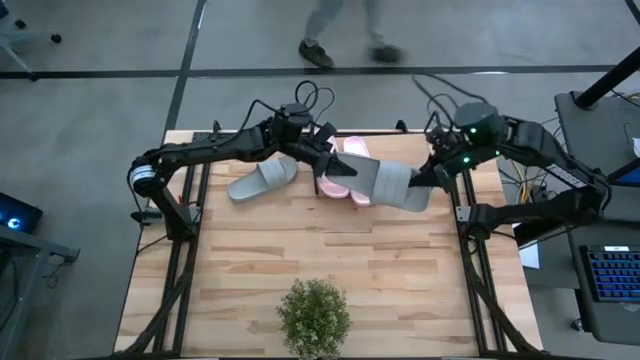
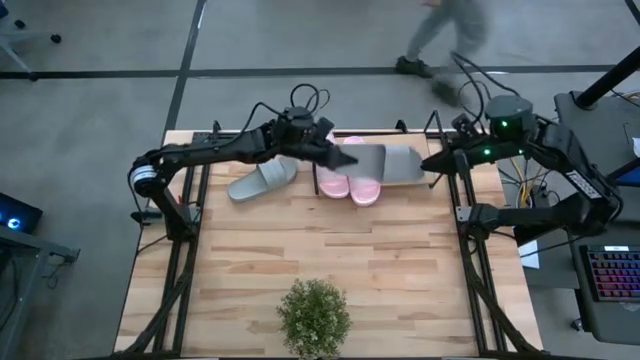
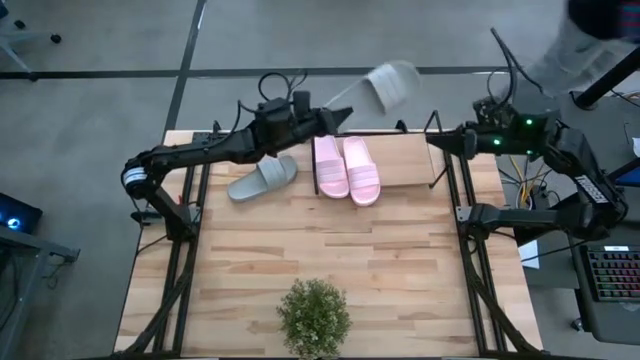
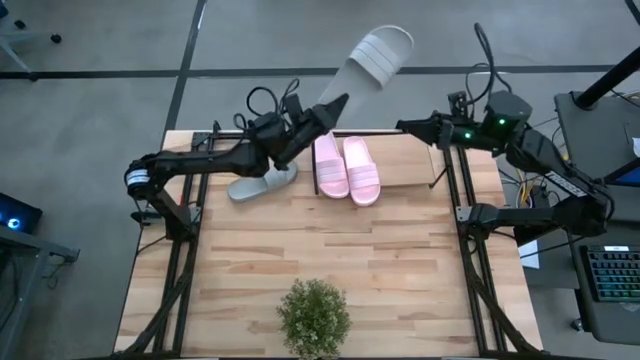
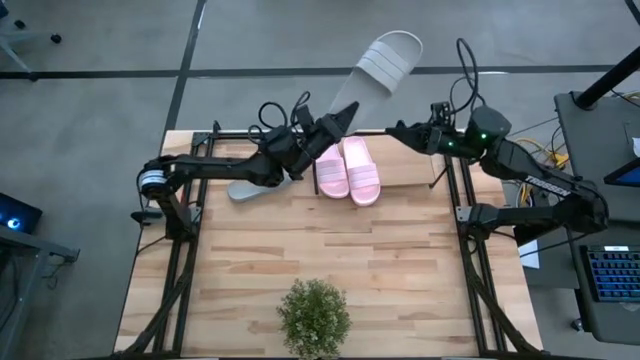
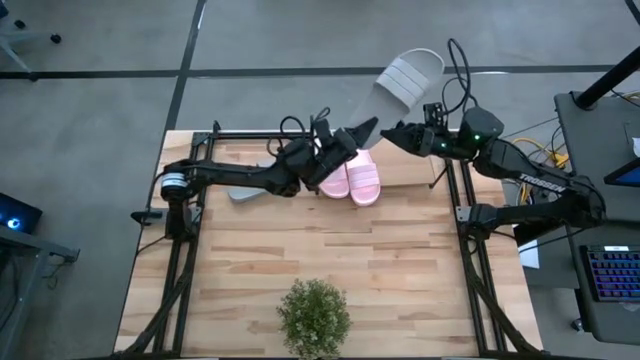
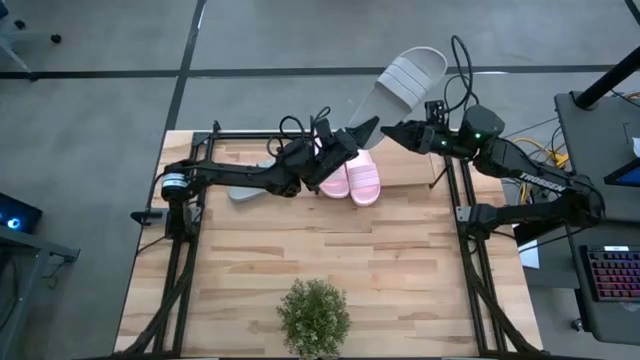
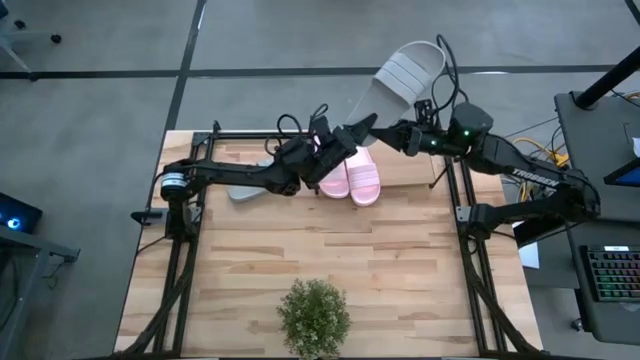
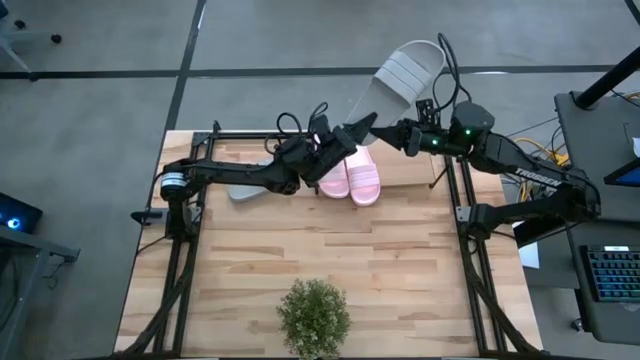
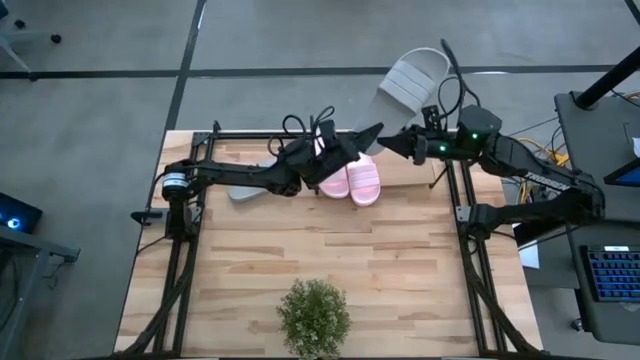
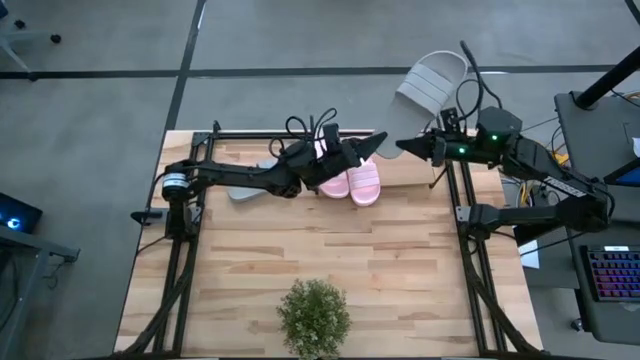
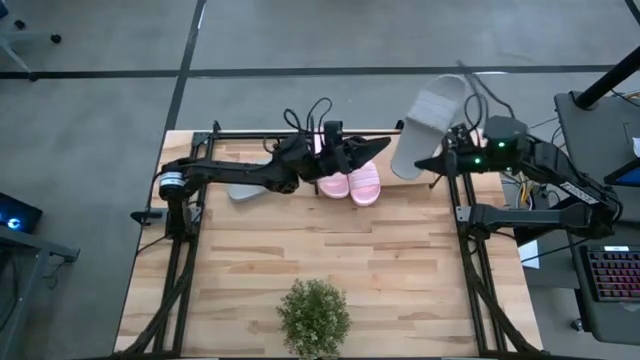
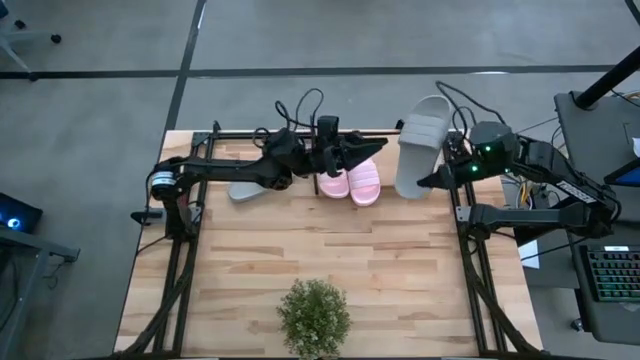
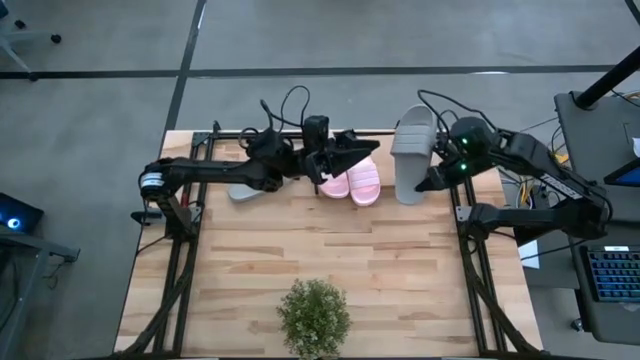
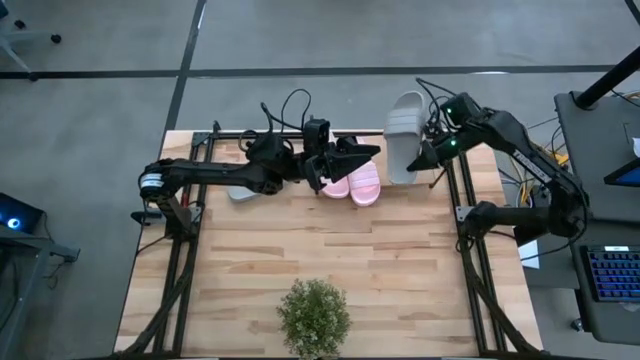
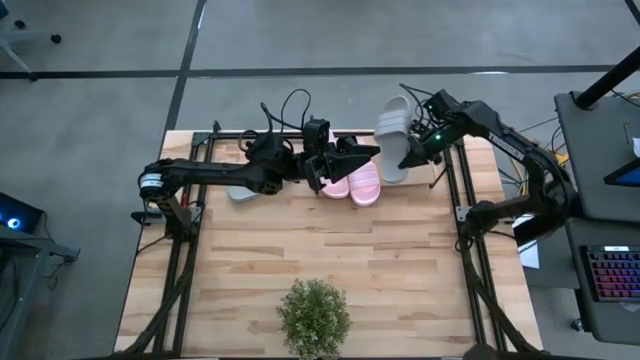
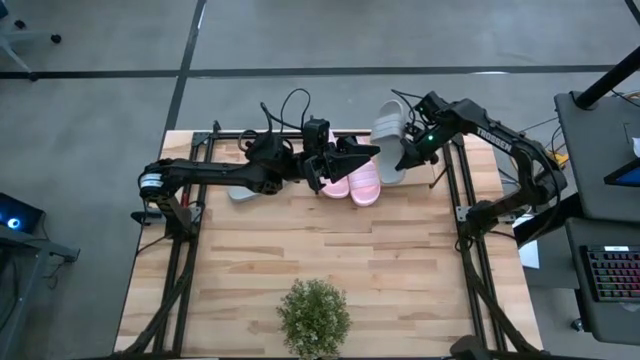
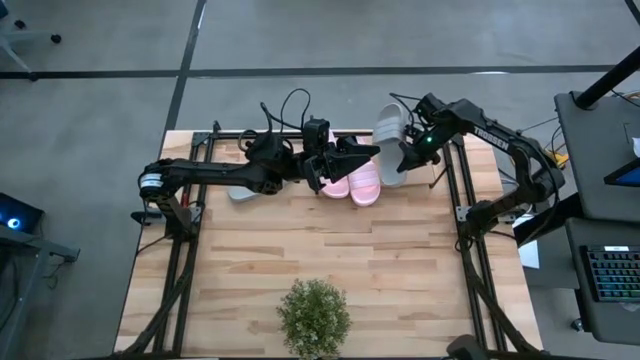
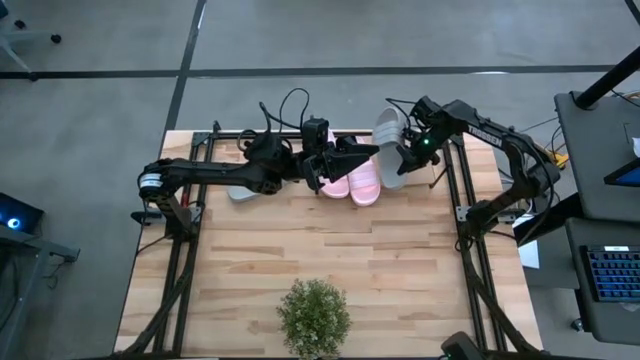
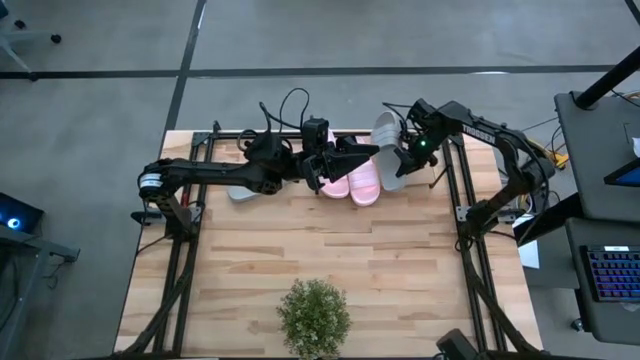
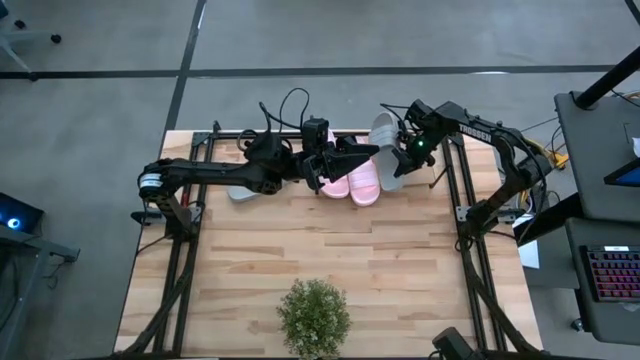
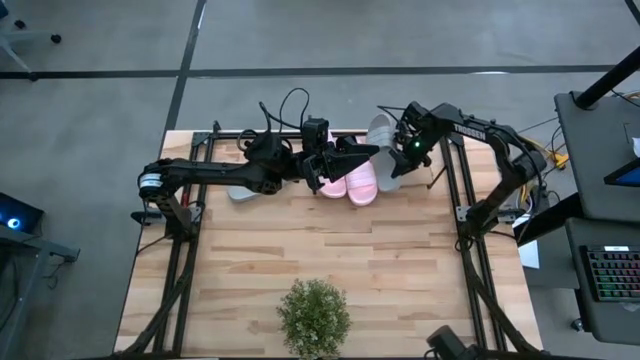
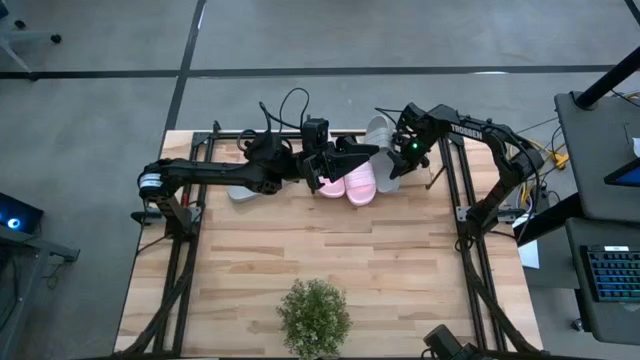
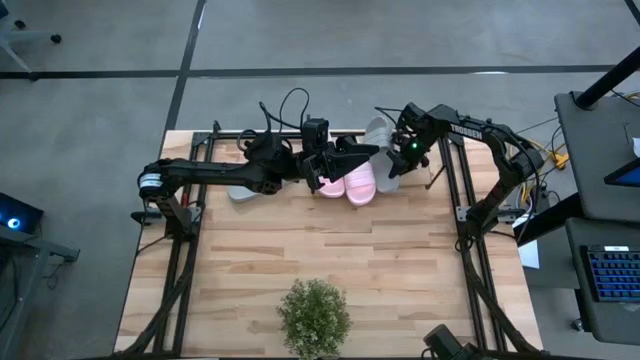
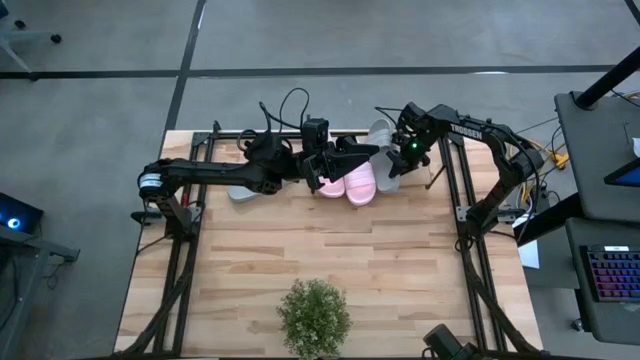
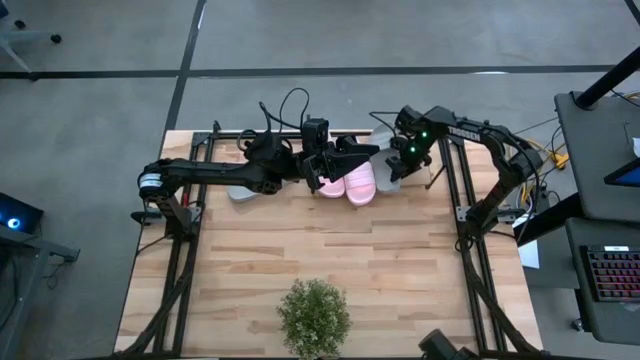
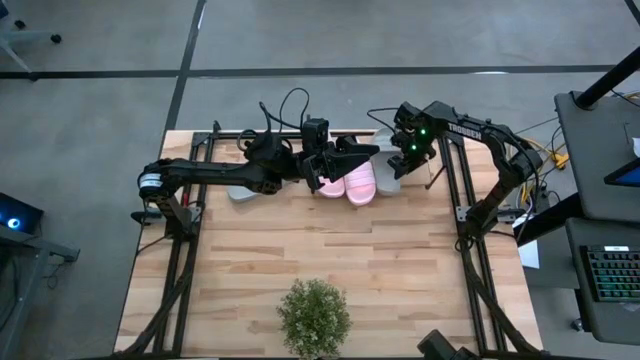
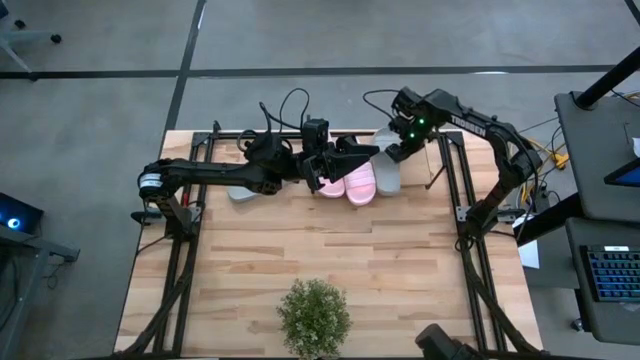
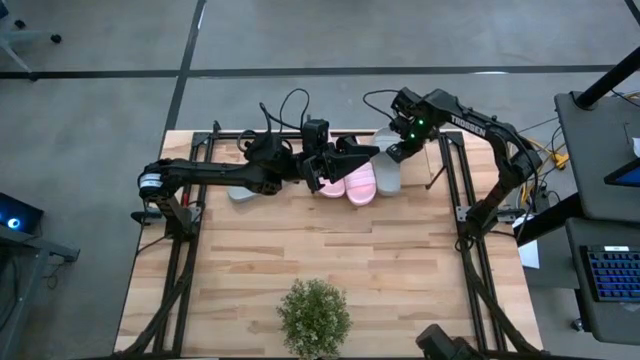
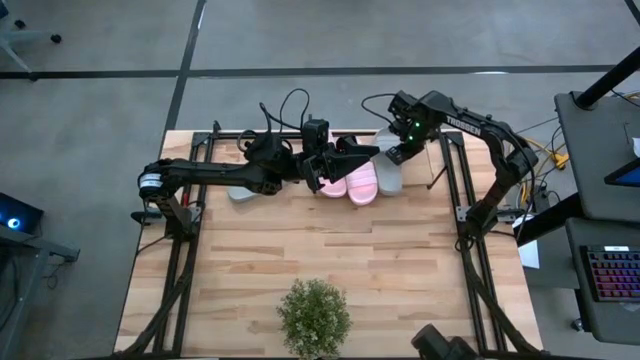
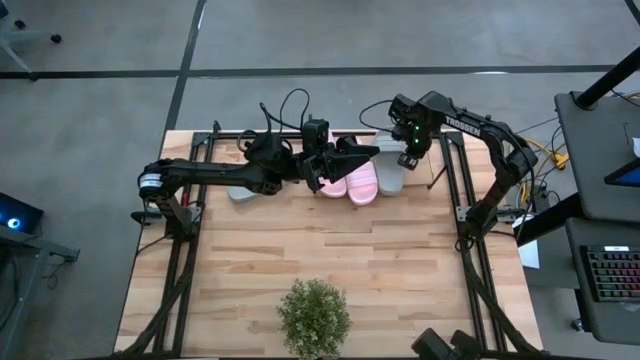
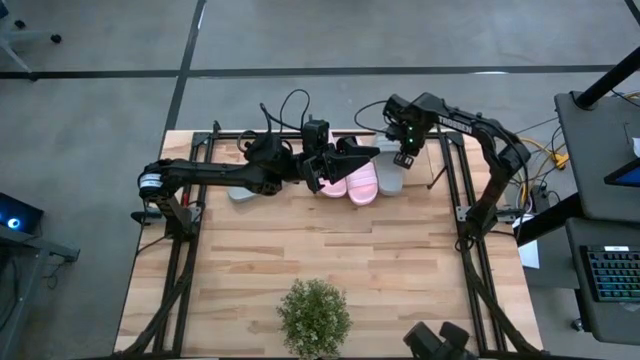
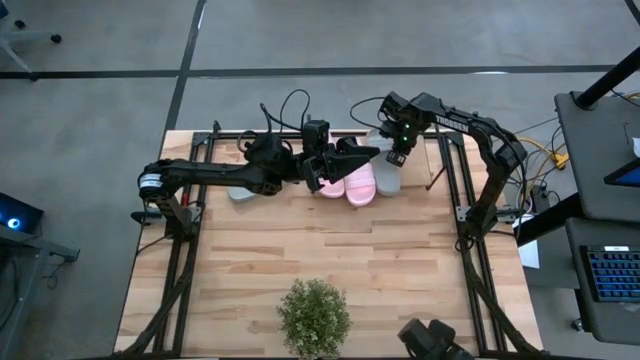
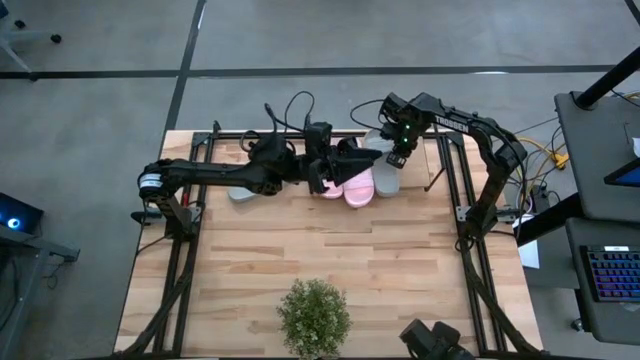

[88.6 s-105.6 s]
Task: Pick and place slides into the shelf
Put the top gray slipper on the shelf

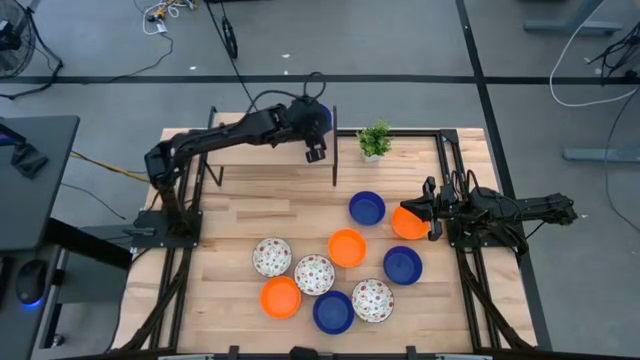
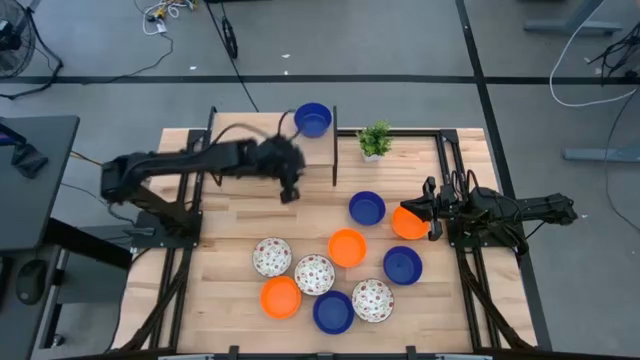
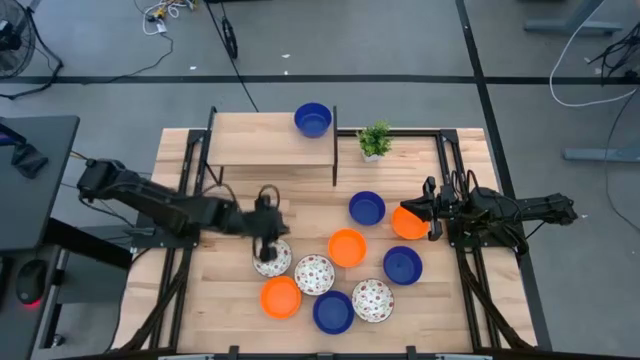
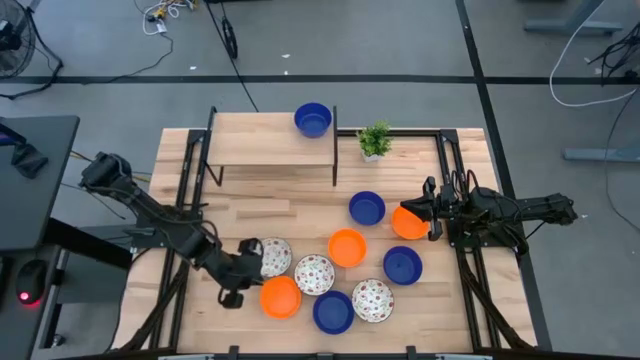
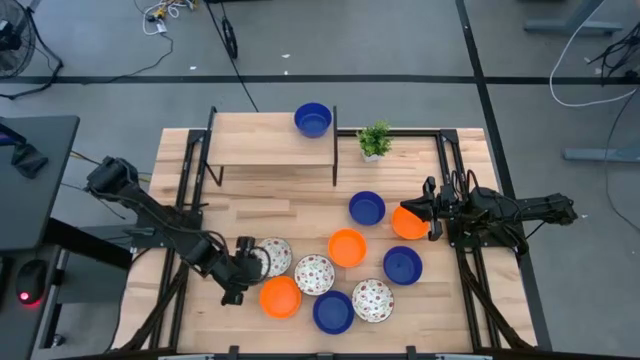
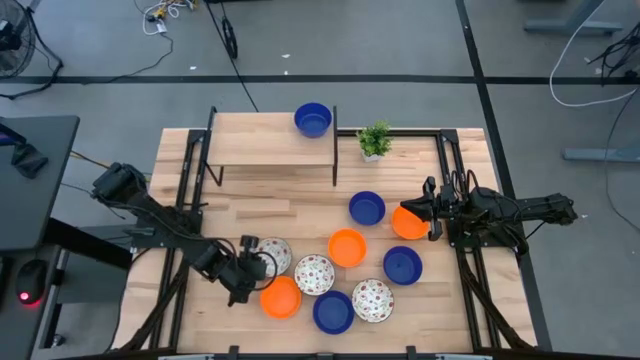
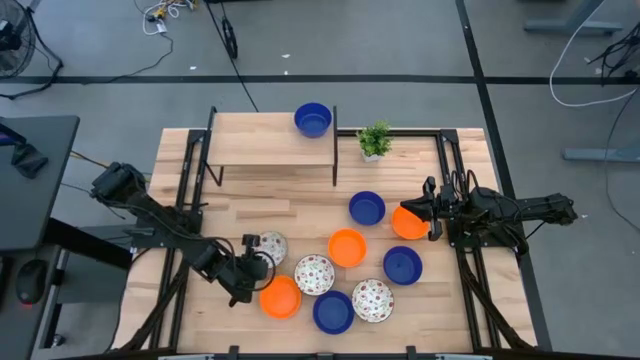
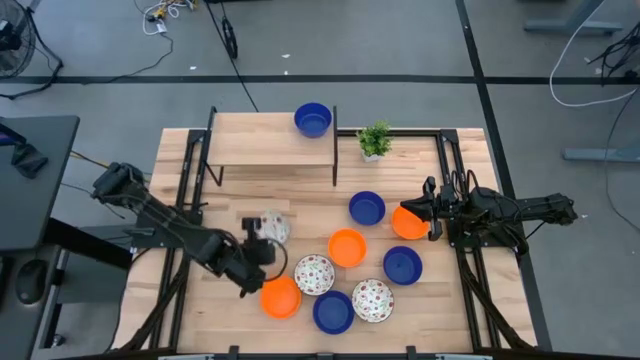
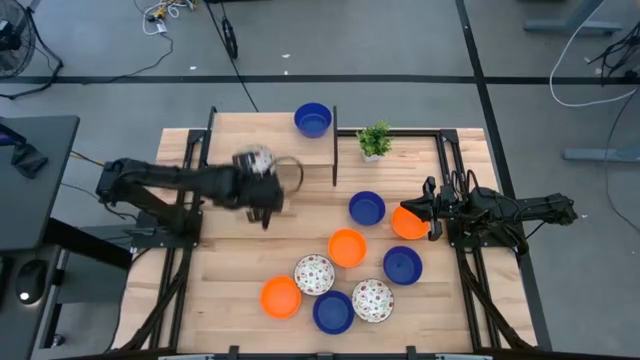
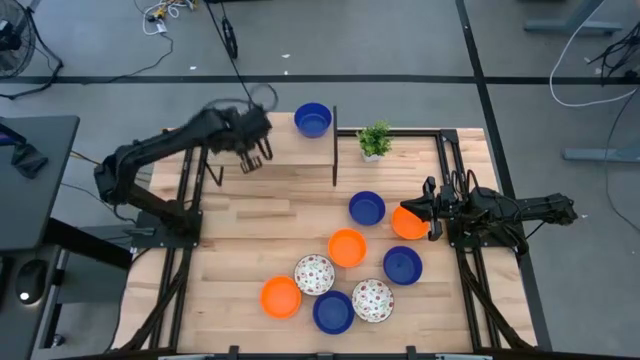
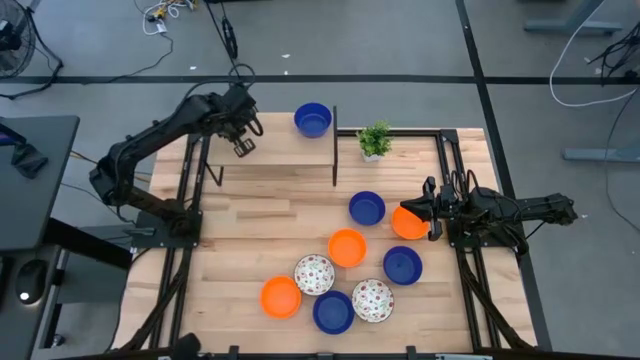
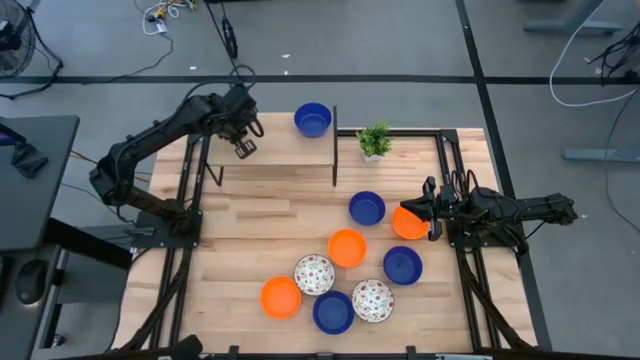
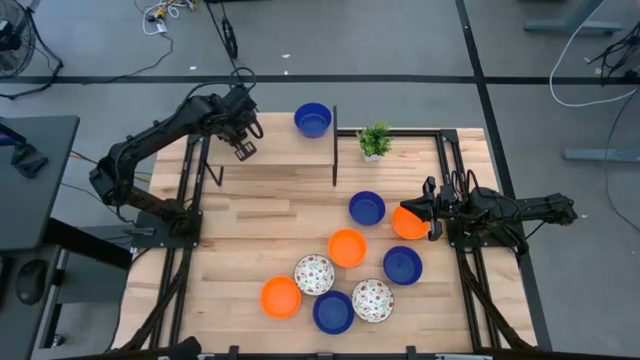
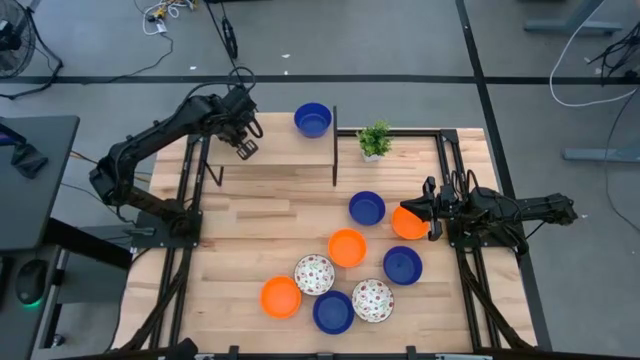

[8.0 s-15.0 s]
Task: Pick & Place Mini bowls
Put the white bowl on the shelf
